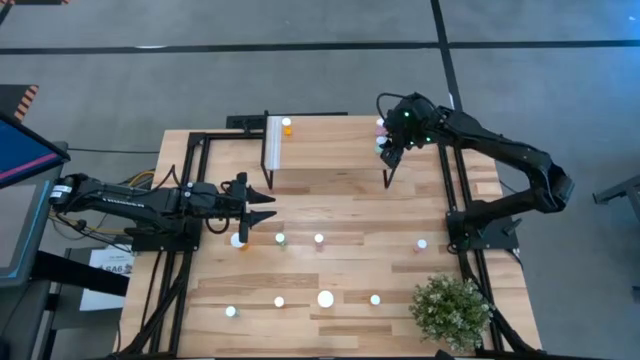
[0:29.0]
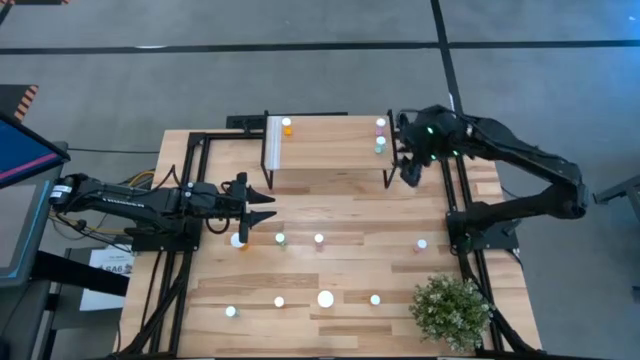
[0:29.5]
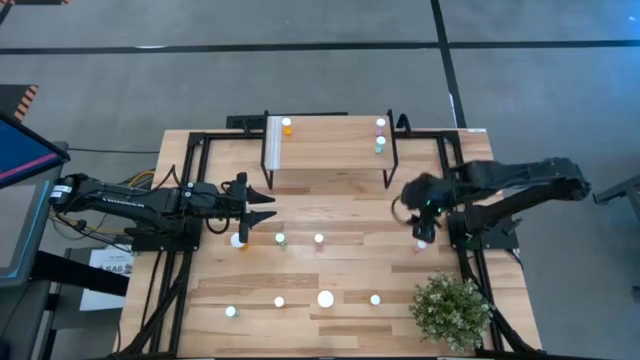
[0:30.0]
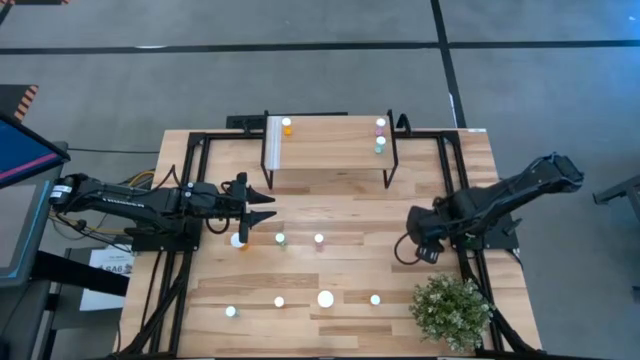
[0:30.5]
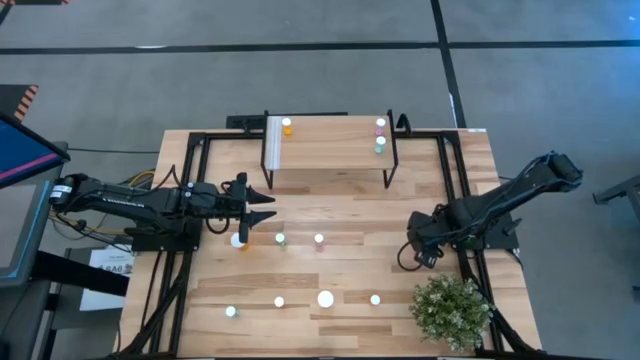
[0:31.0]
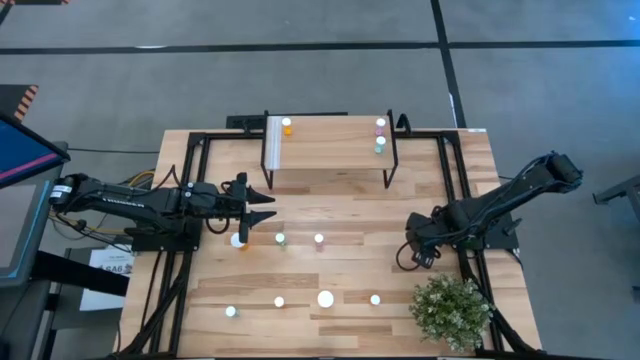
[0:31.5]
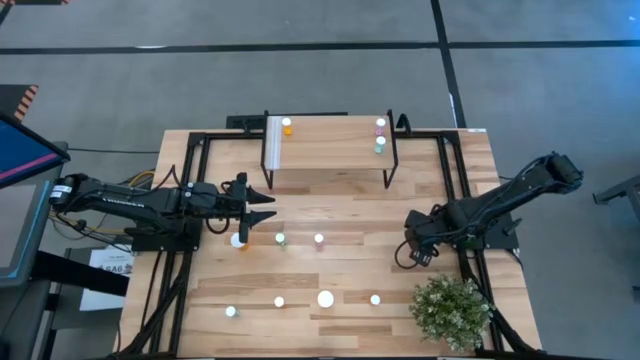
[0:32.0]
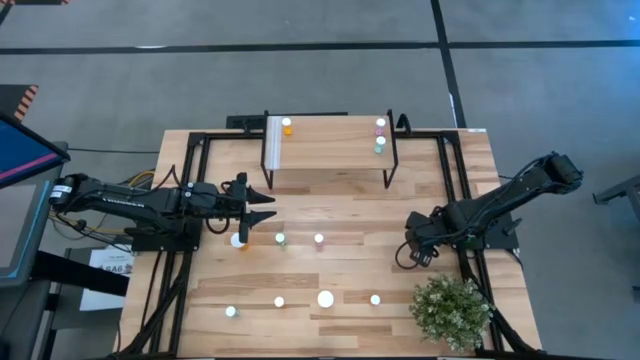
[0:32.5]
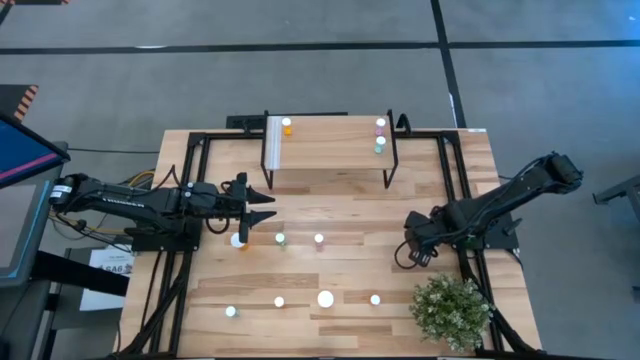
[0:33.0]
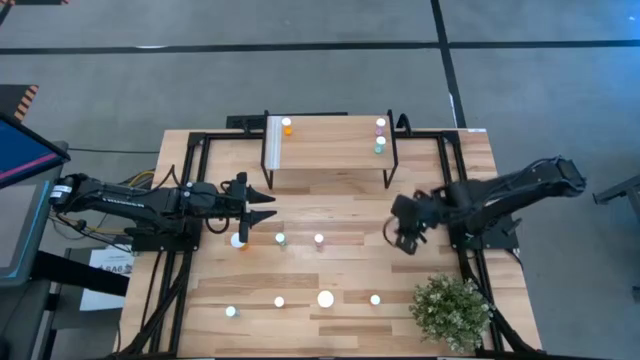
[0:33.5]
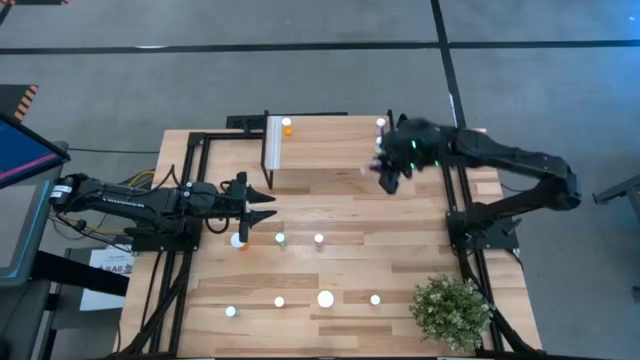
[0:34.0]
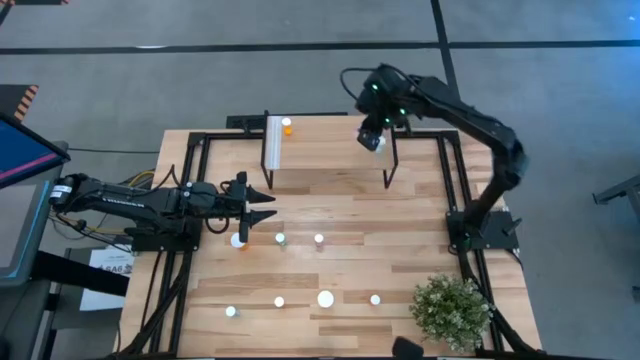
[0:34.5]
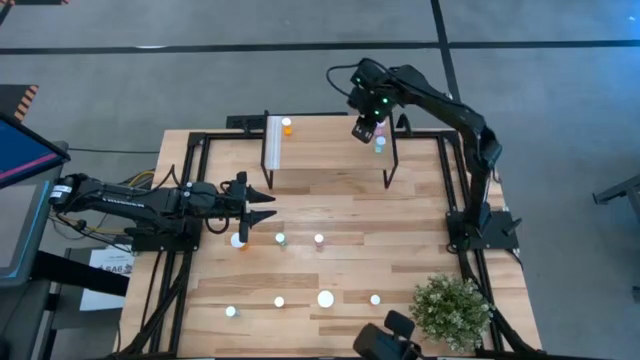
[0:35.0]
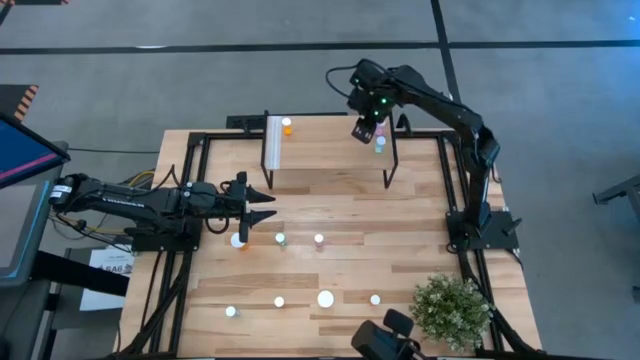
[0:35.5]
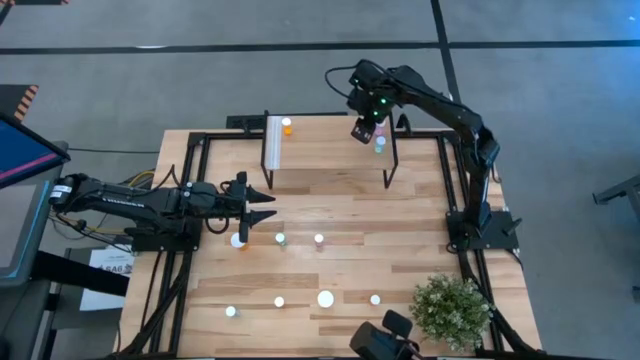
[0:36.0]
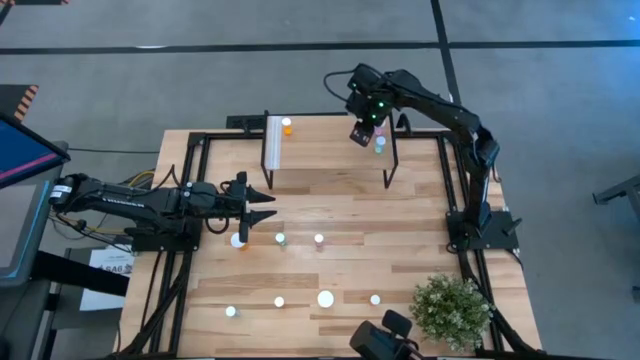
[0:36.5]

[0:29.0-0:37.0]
Task: Pick and place medicine bottles onto shelf by color
Put the right pink pill bottle on the shelf

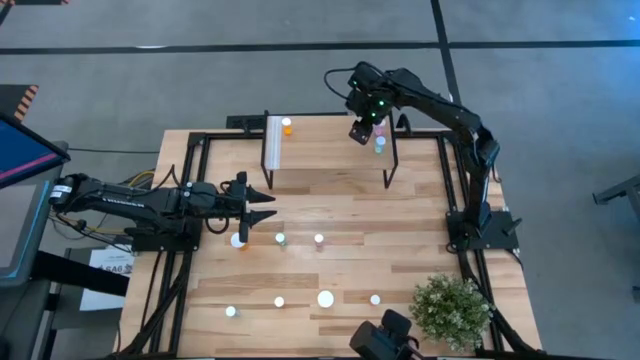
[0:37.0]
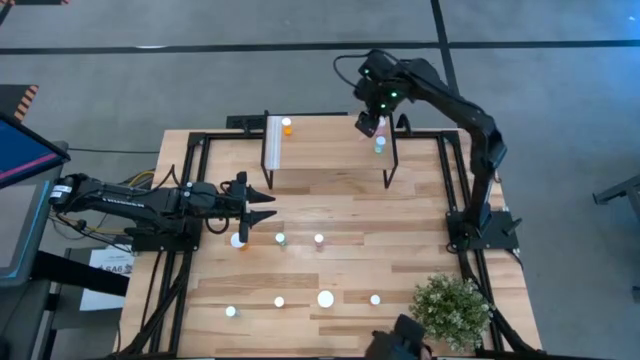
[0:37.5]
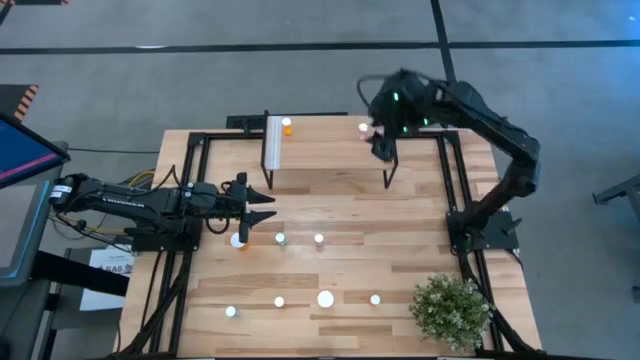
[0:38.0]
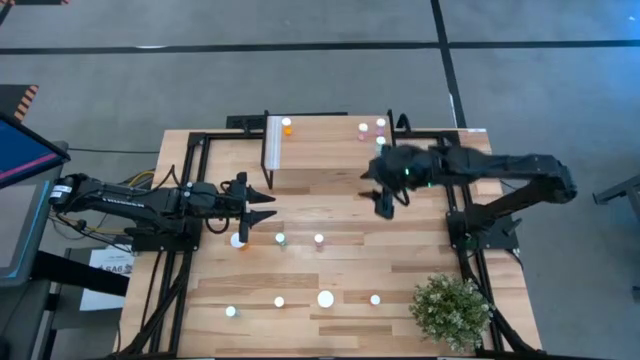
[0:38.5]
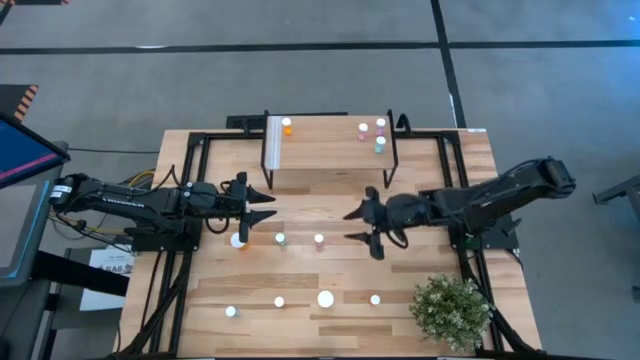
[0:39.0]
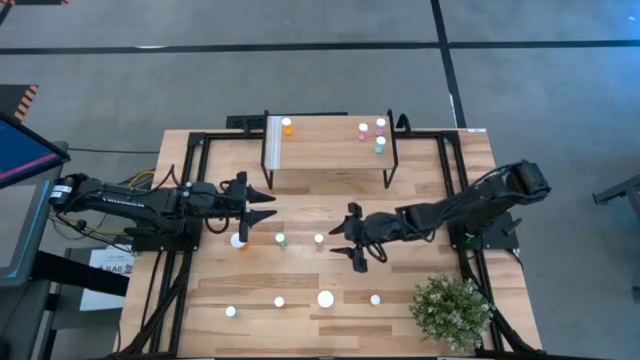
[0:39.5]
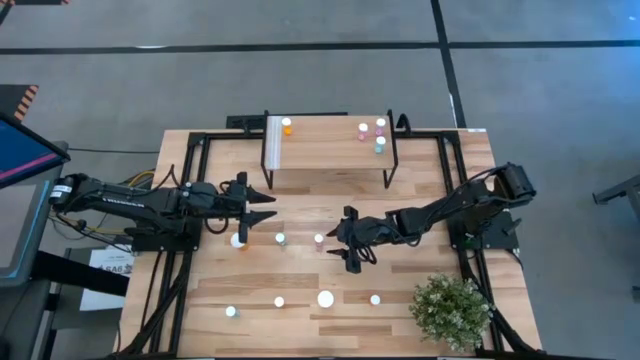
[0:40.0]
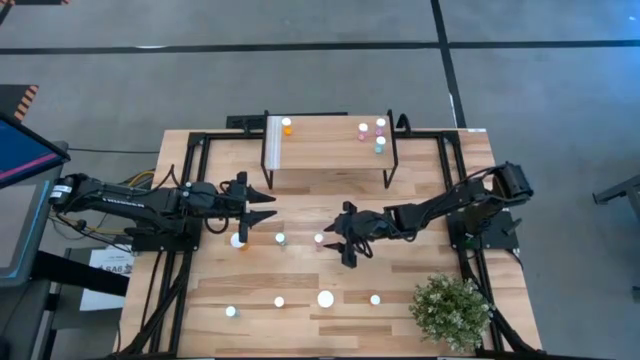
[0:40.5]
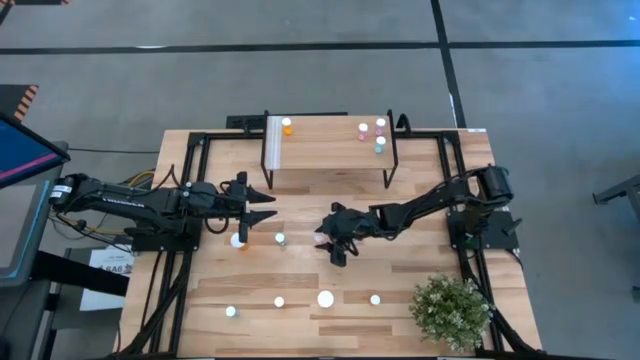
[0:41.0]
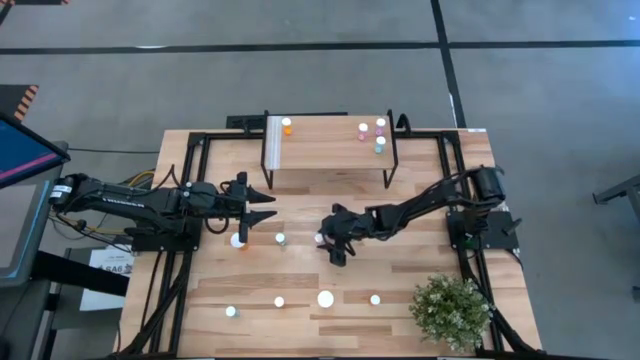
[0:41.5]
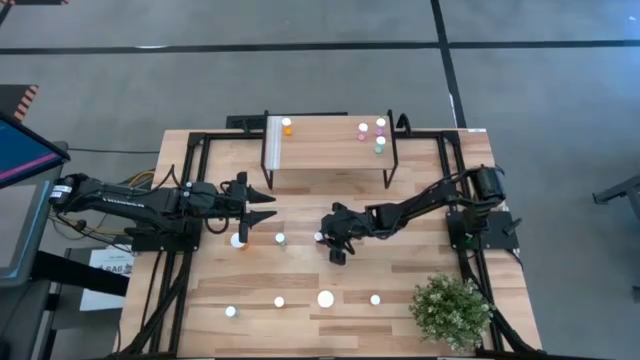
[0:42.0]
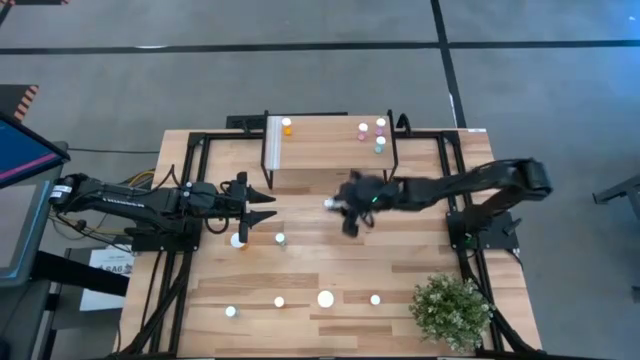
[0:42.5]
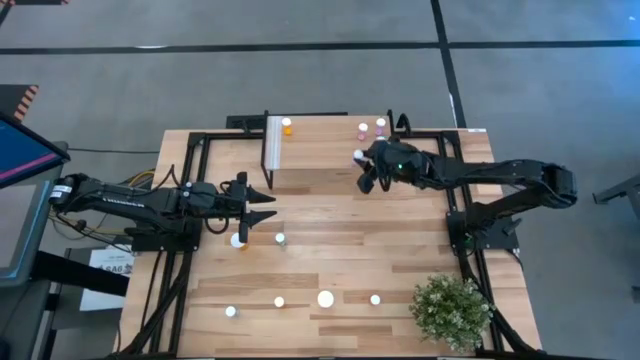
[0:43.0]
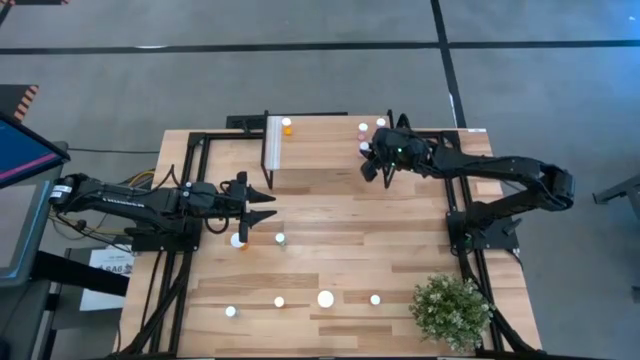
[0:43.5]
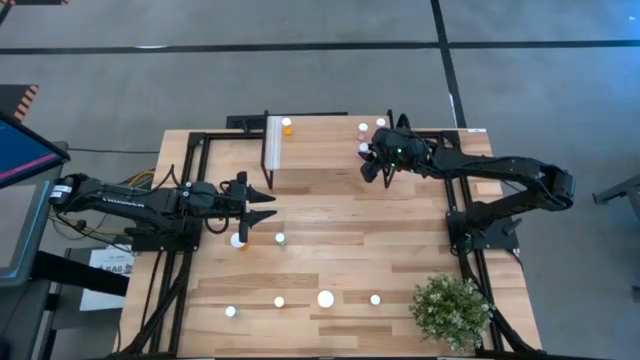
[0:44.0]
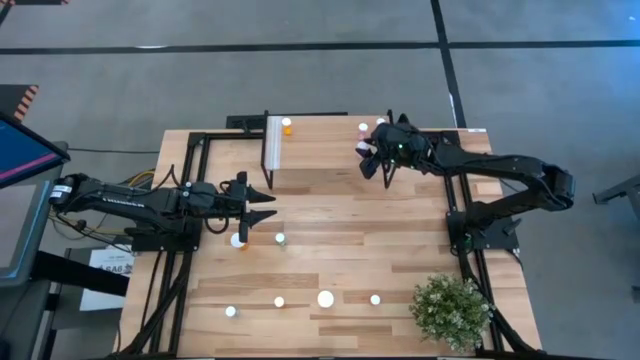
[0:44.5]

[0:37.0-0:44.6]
Put the pink pill bottle on the shelf

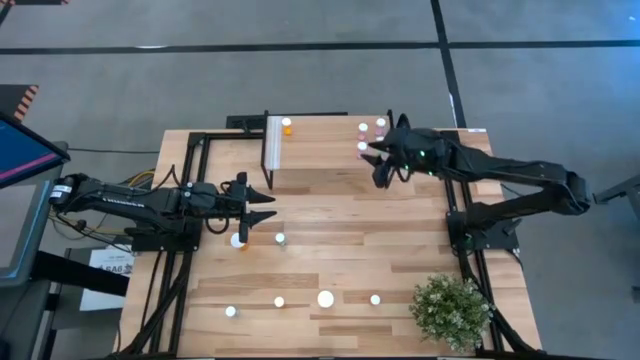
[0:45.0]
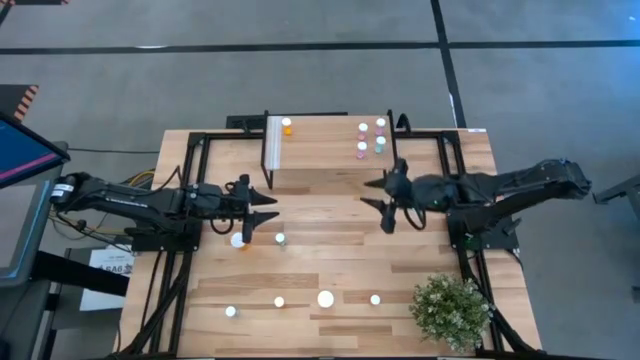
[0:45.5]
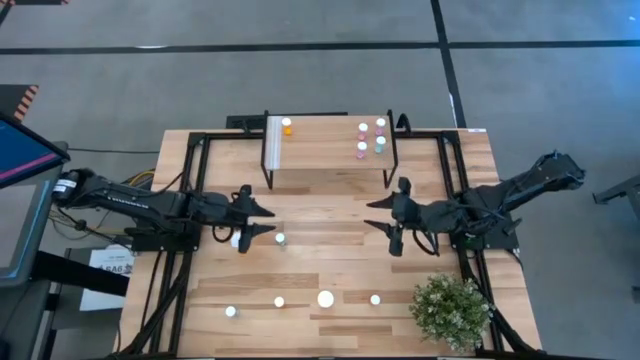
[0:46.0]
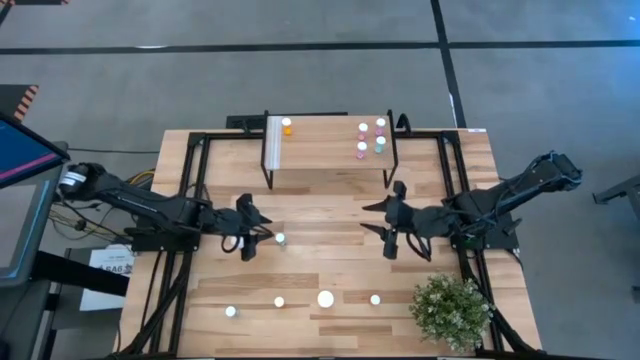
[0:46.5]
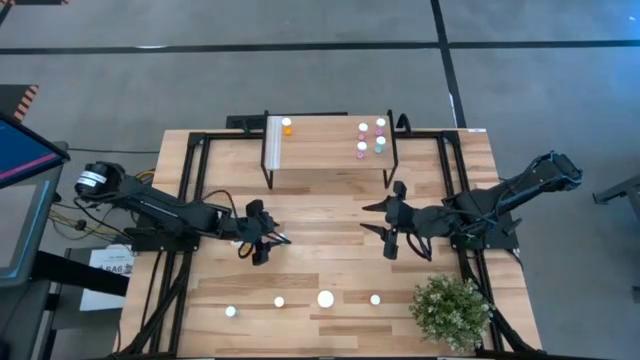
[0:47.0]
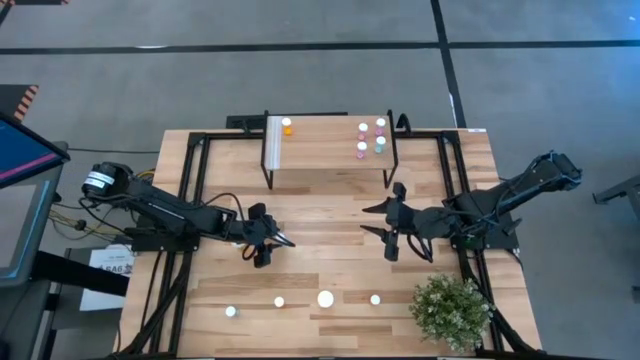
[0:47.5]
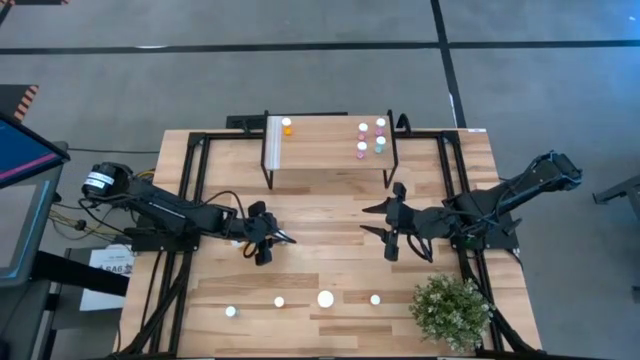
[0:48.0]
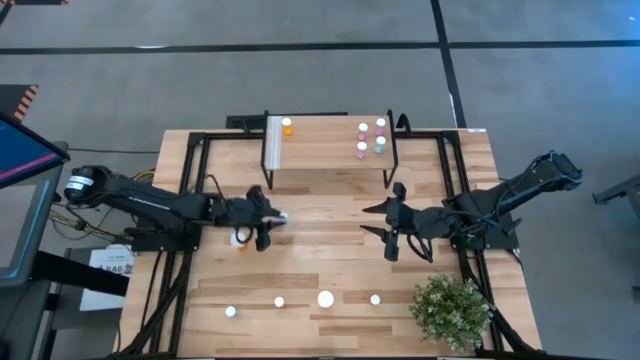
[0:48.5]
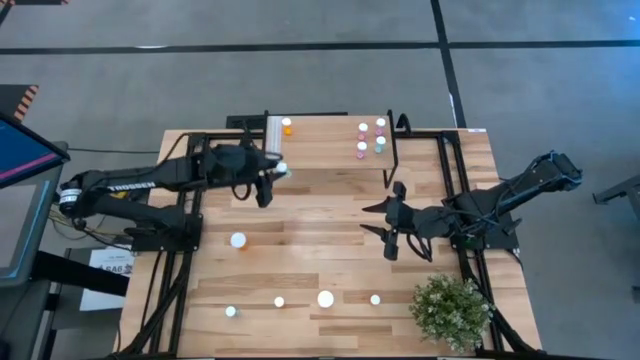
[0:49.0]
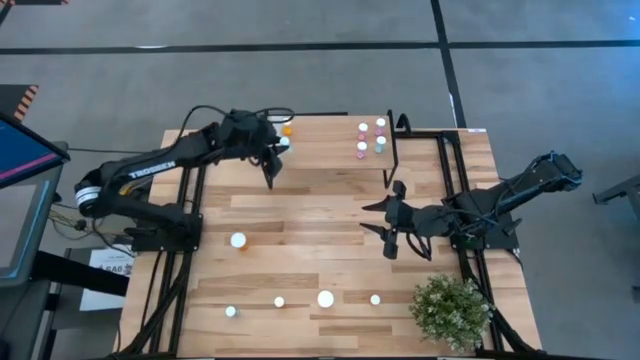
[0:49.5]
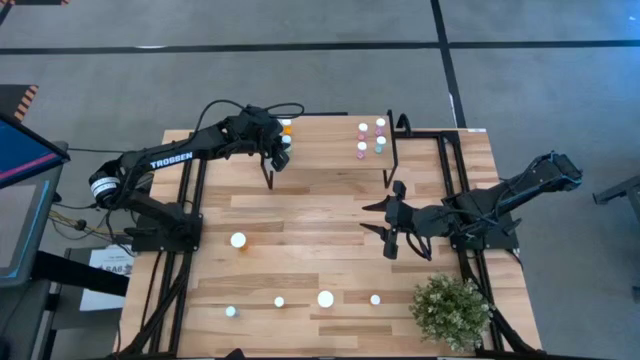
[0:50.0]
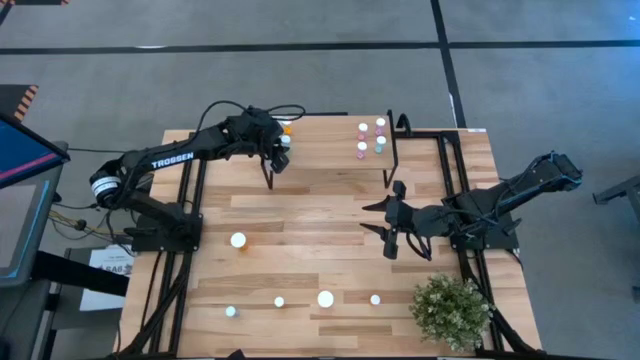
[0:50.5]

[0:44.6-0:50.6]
Put the top green pill bottle on the shelf
